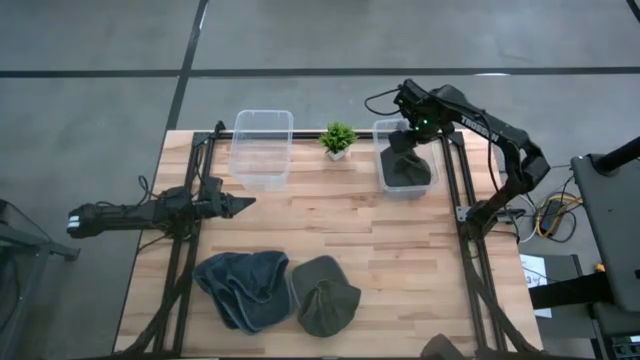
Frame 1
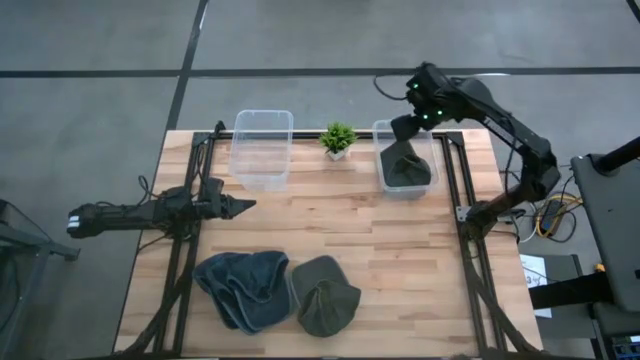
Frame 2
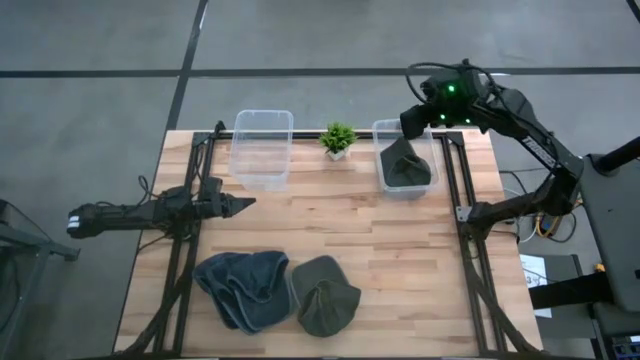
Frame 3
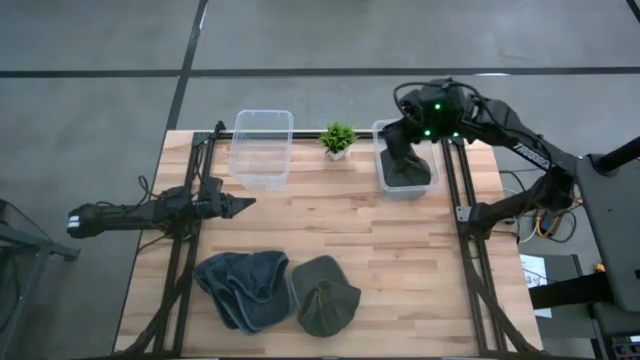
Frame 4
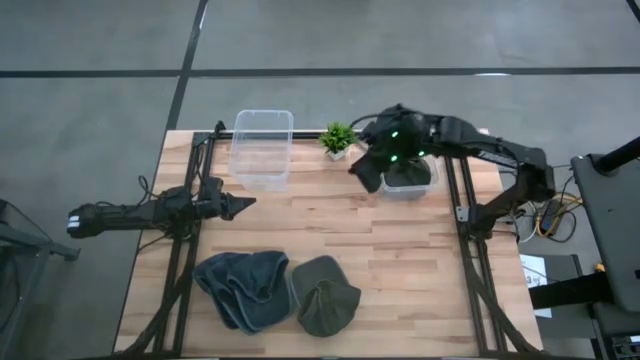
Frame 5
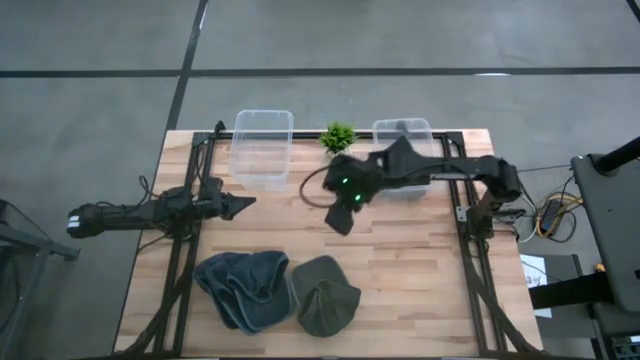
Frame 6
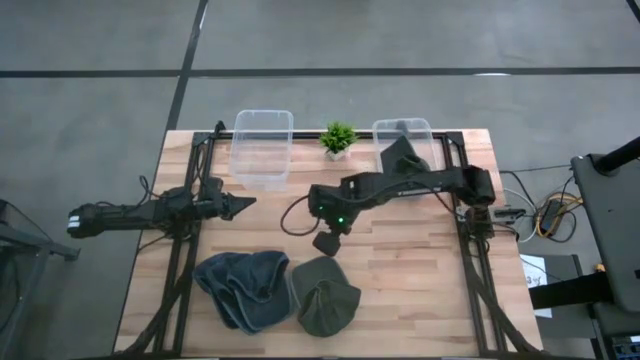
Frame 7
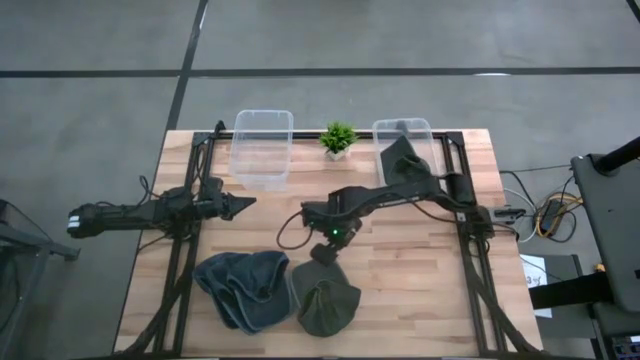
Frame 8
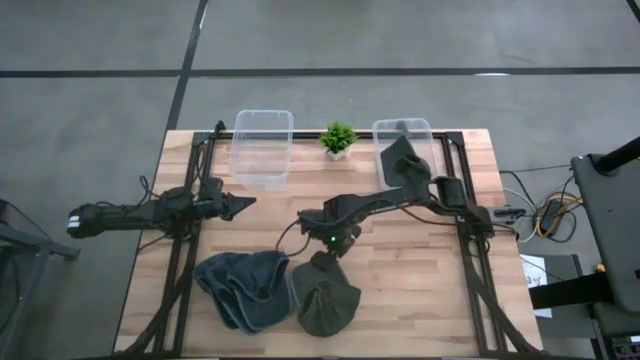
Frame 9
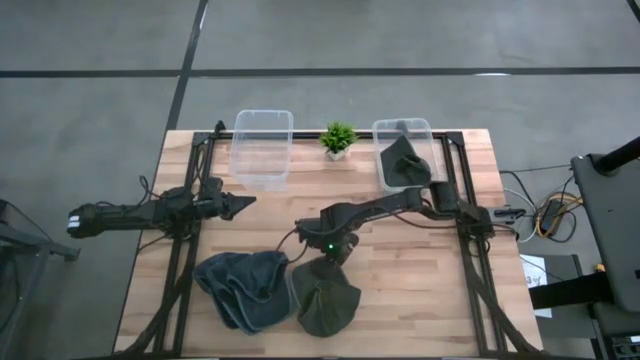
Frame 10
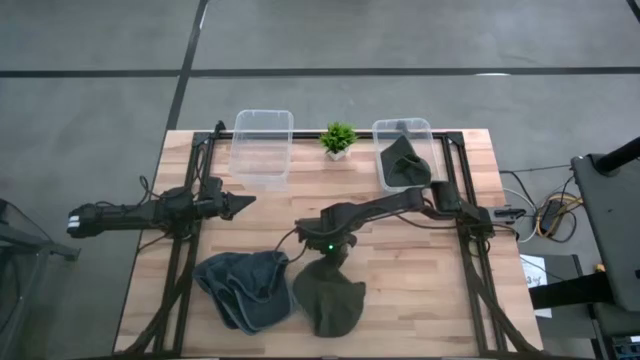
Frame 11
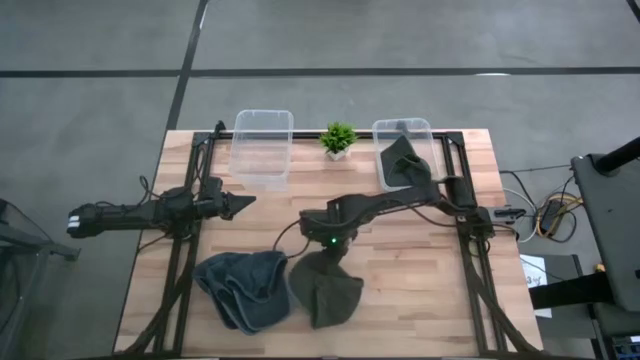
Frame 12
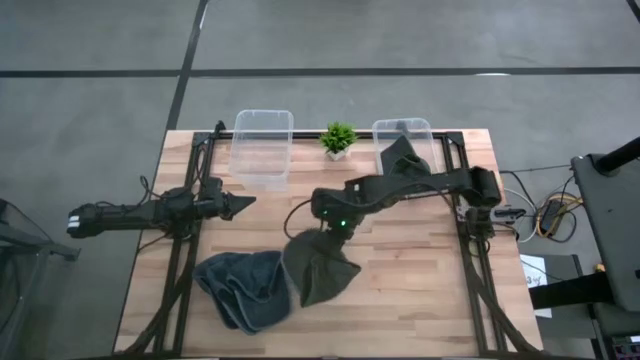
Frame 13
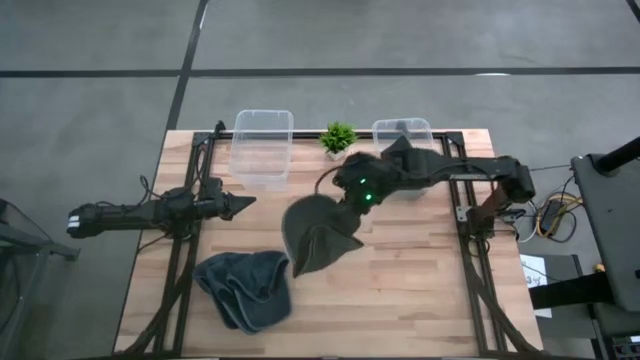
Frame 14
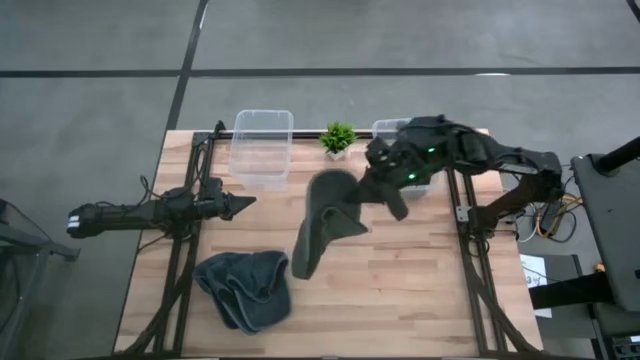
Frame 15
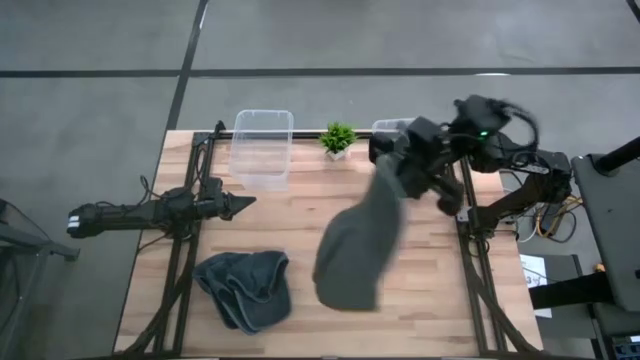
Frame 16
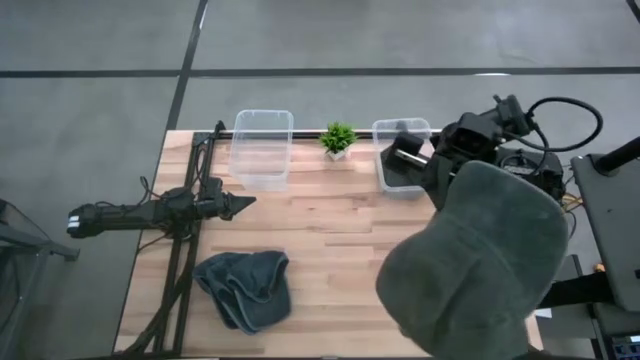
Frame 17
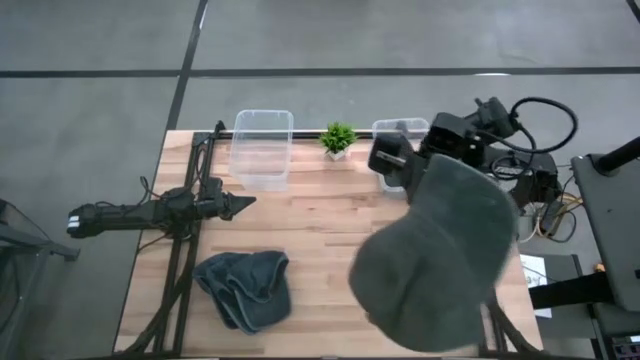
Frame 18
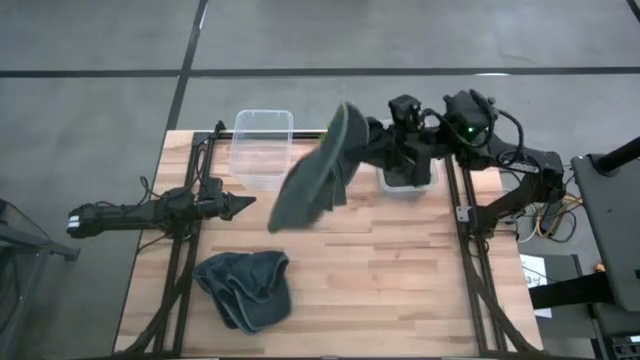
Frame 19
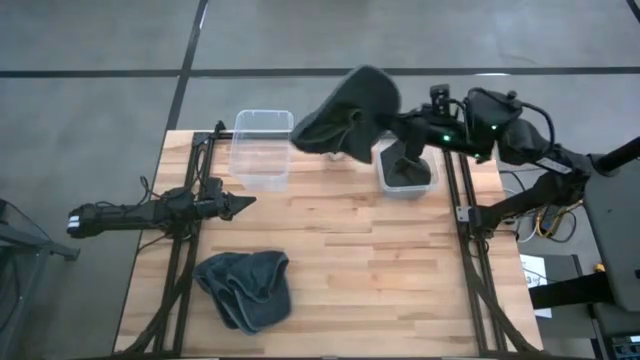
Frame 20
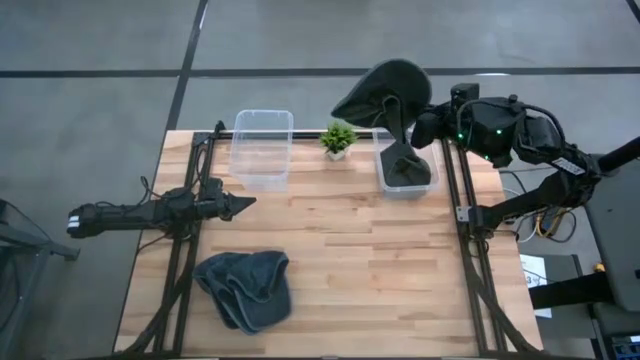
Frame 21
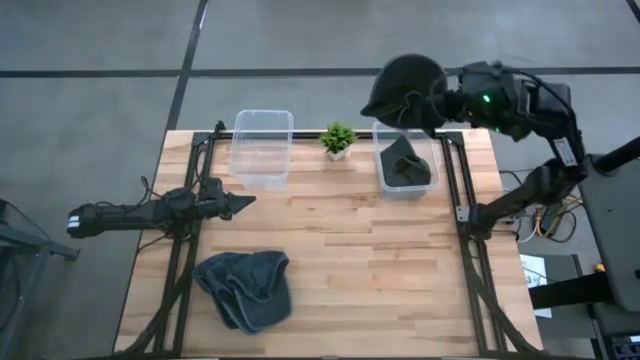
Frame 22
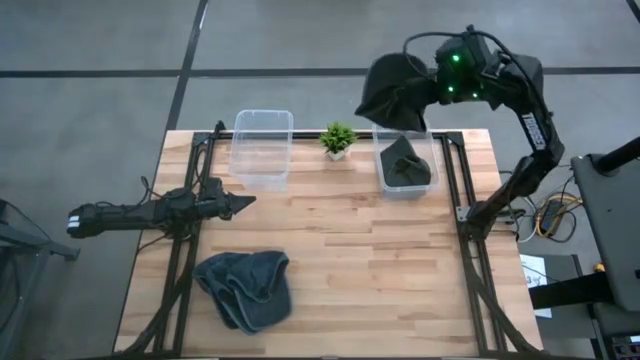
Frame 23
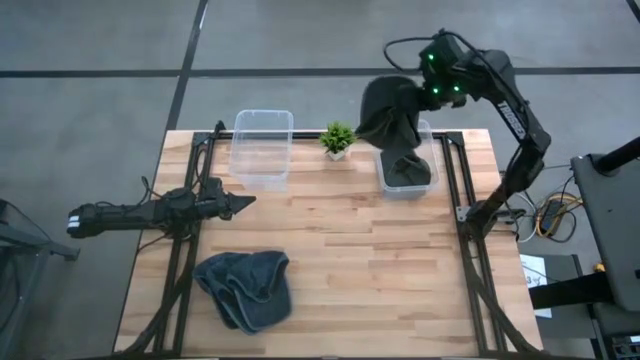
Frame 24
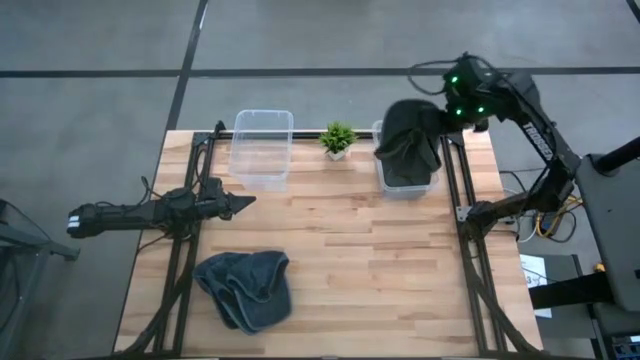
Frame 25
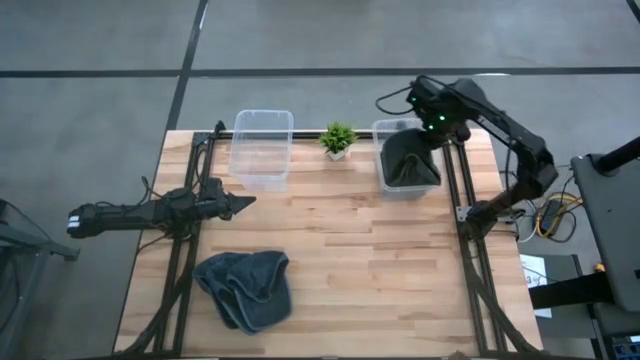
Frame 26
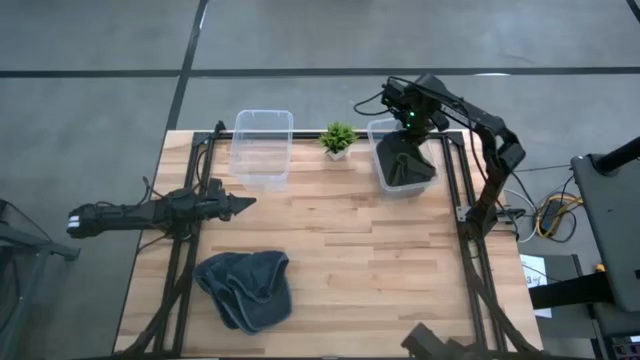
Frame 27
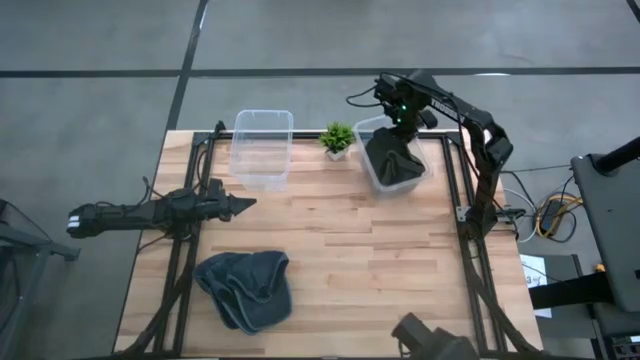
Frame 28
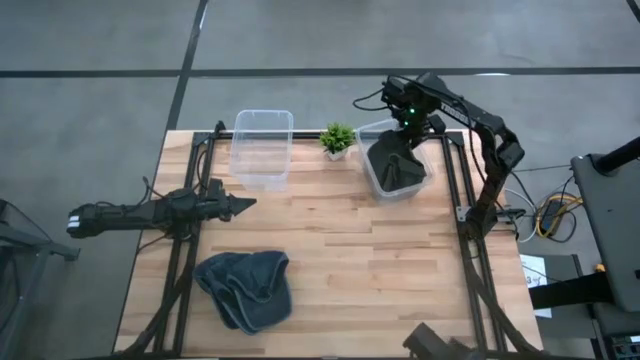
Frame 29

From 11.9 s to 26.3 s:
Task: Pick & Place hat
Put the gray cap into the right transparent bin

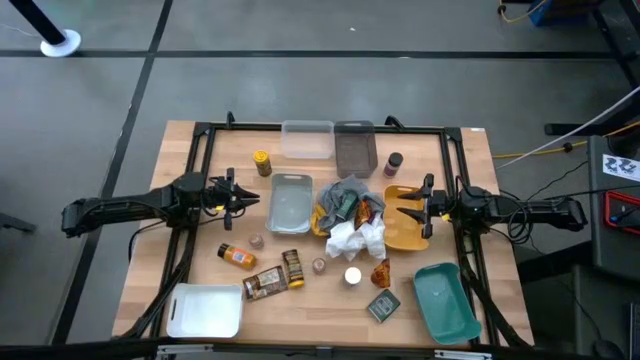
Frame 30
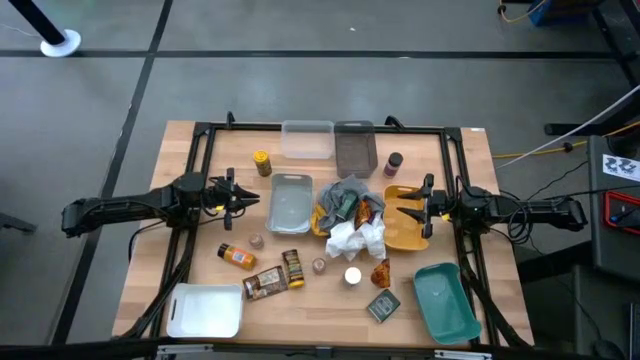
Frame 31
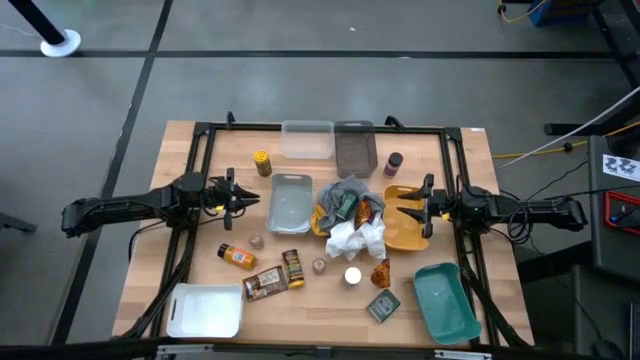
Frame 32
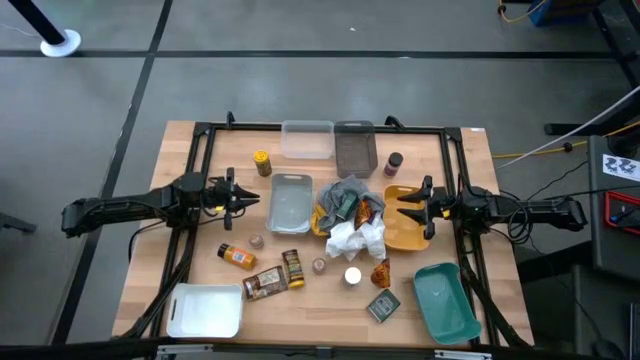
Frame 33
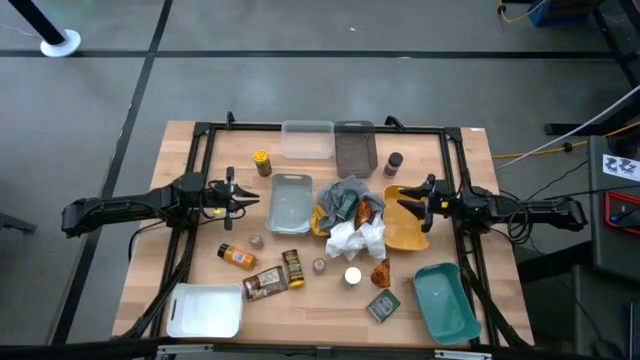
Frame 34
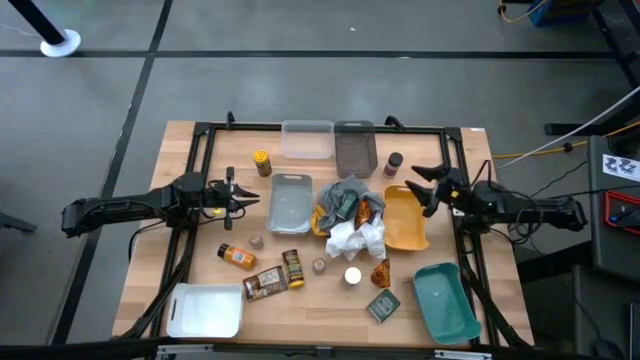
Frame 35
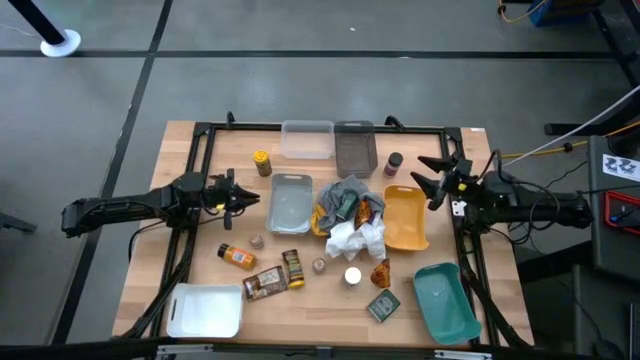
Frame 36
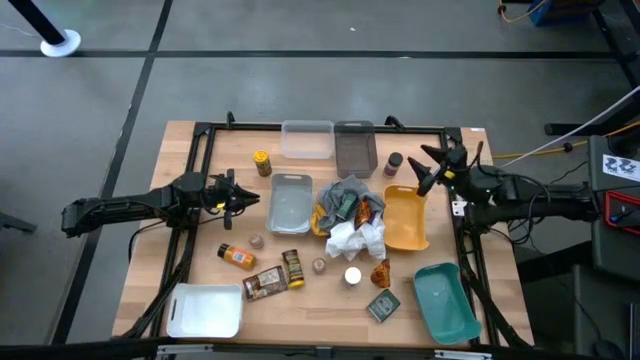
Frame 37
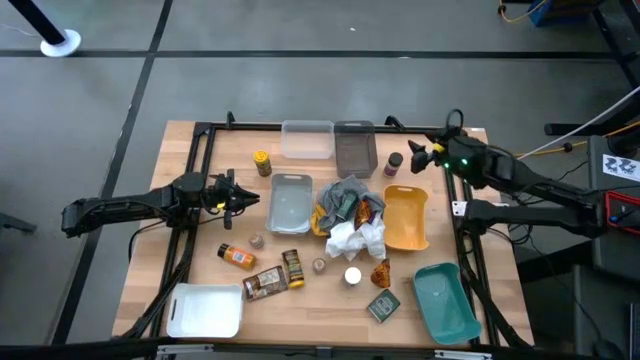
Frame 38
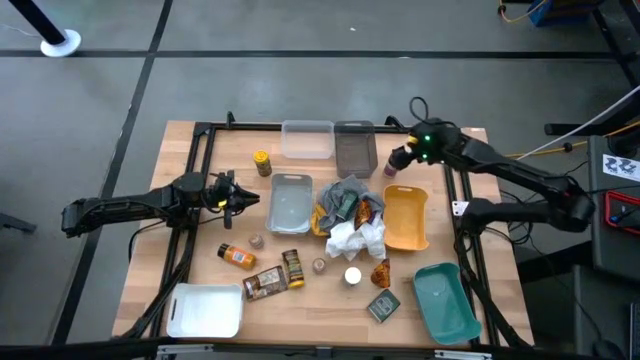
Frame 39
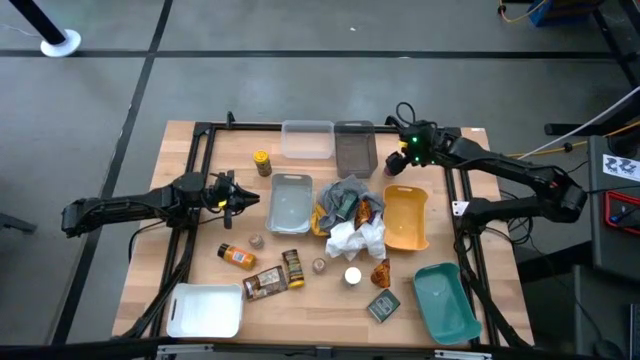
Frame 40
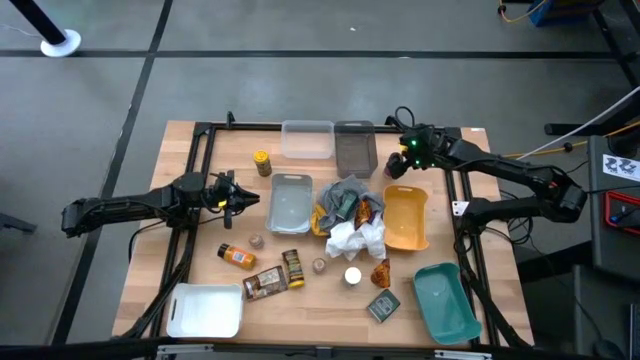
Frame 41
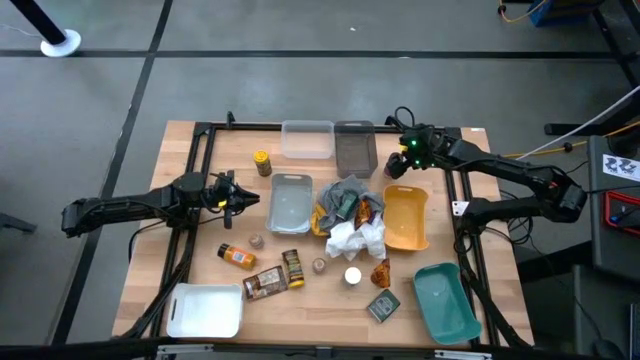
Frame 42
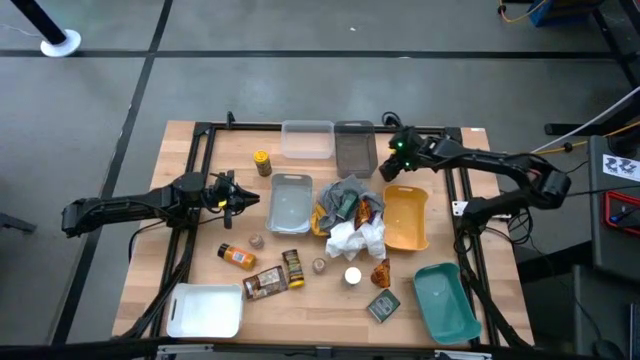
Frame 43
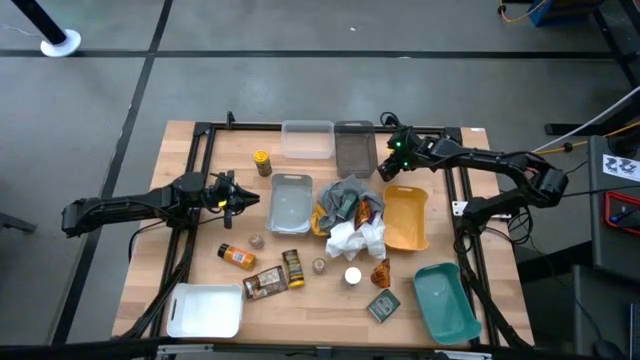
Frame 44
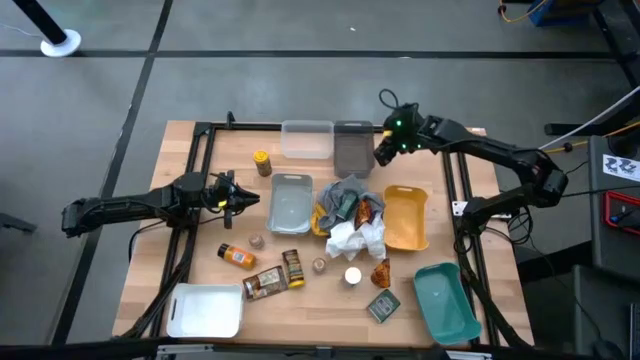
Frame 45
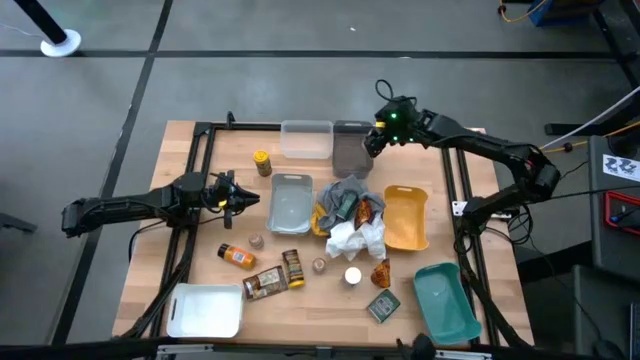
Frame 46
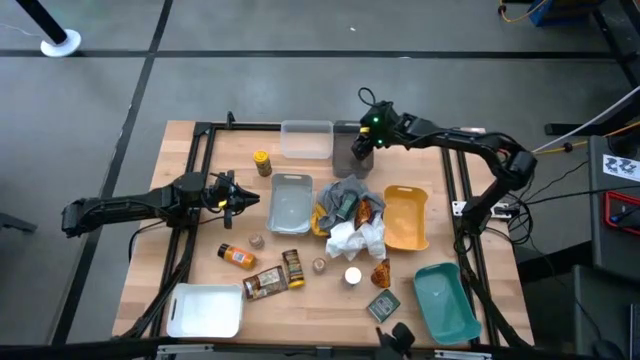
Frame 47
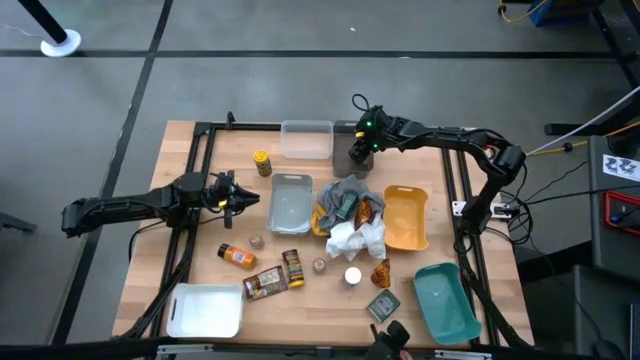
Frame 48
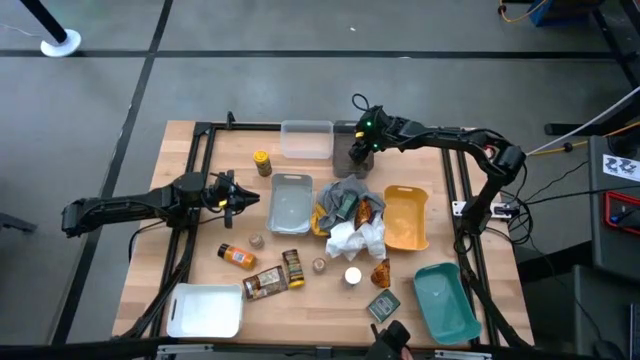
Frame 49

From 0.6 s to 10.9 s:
Task: Sort spices by type
Put the top black seasoning bottle into the black bin
